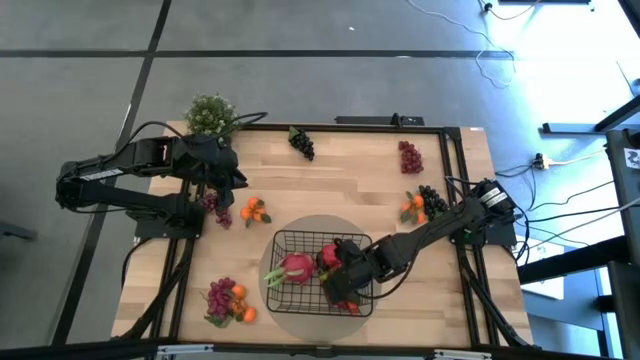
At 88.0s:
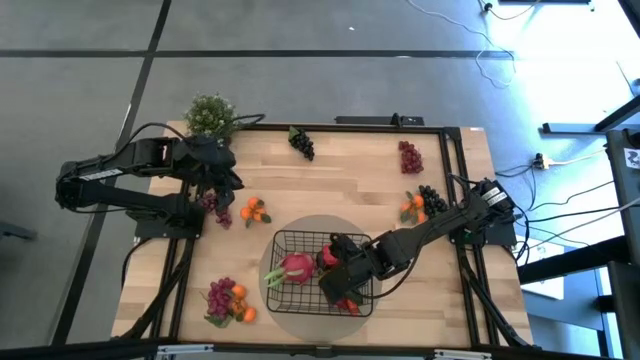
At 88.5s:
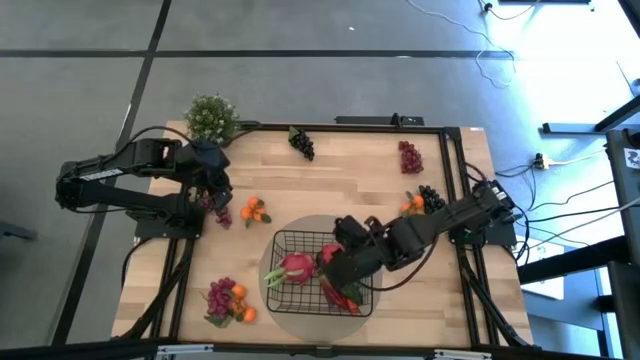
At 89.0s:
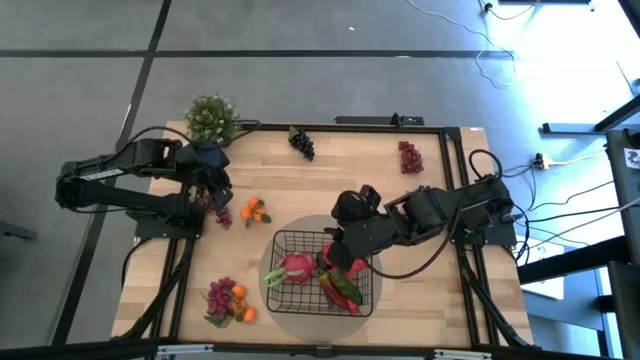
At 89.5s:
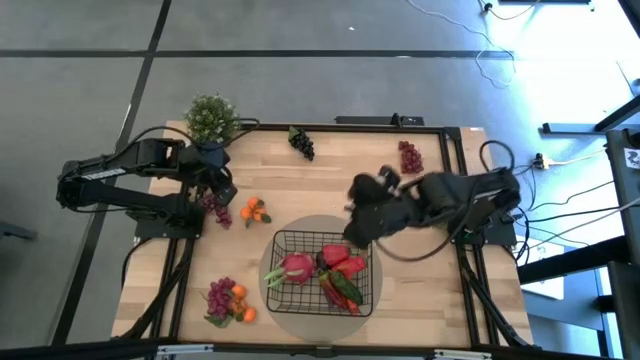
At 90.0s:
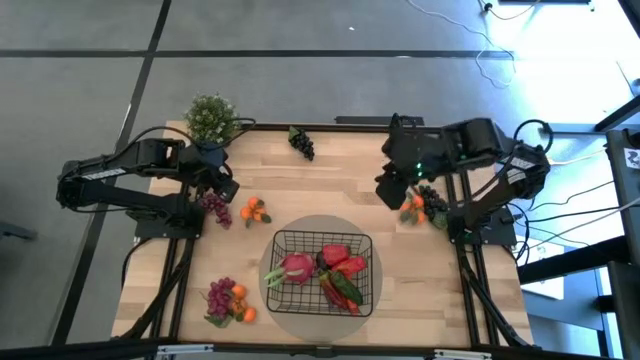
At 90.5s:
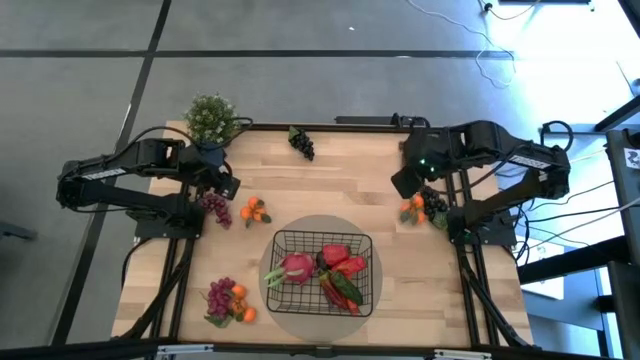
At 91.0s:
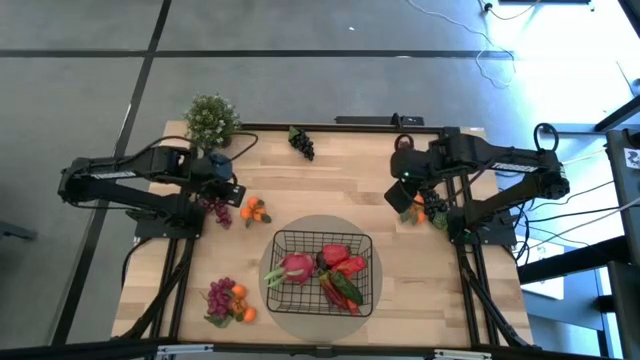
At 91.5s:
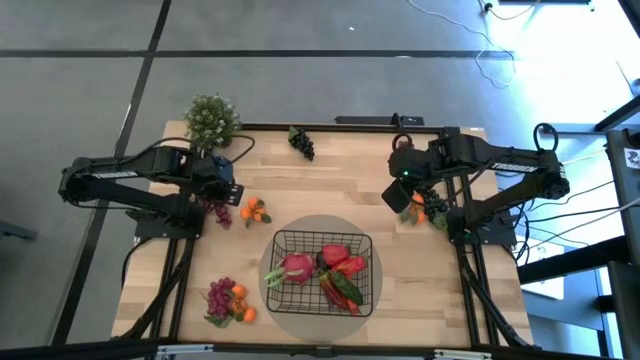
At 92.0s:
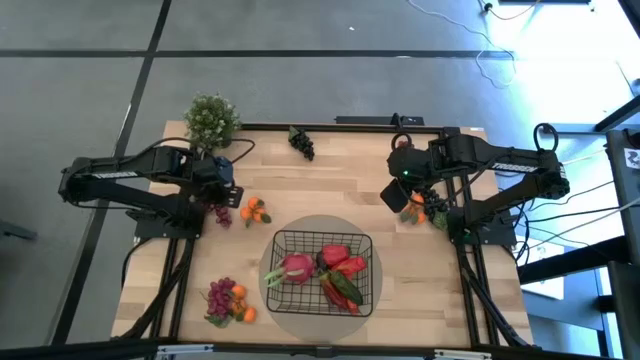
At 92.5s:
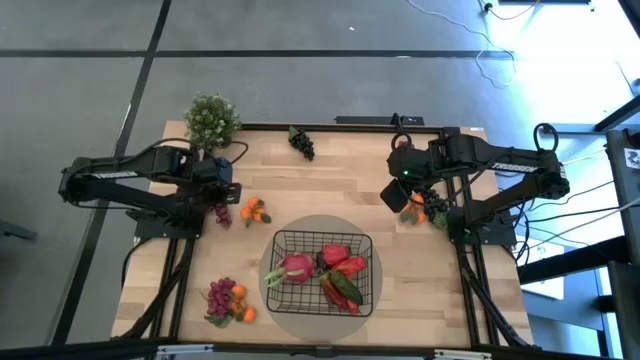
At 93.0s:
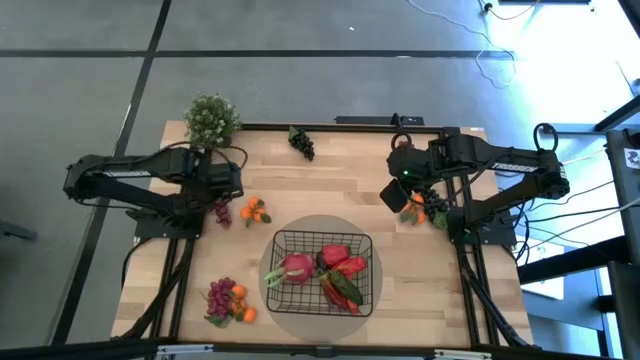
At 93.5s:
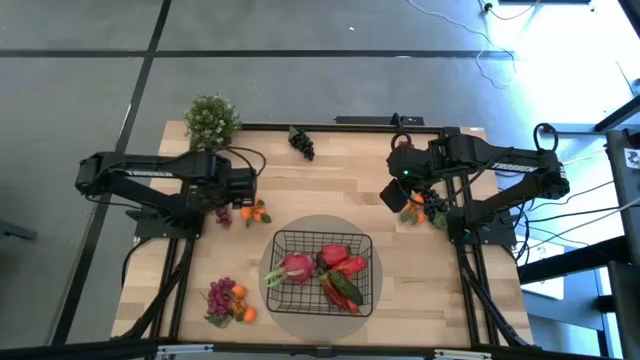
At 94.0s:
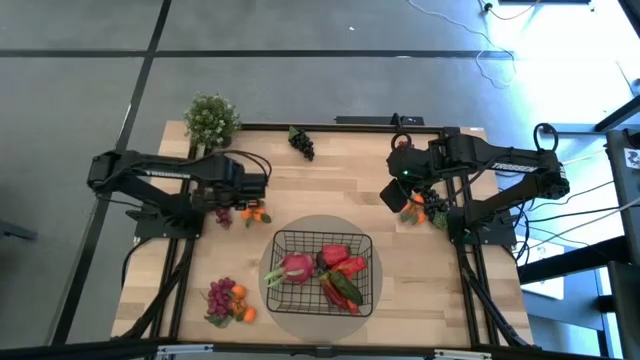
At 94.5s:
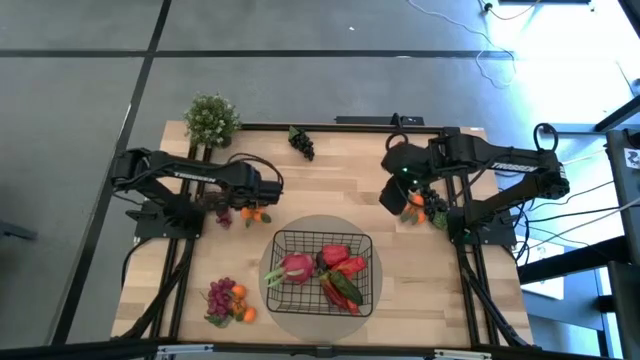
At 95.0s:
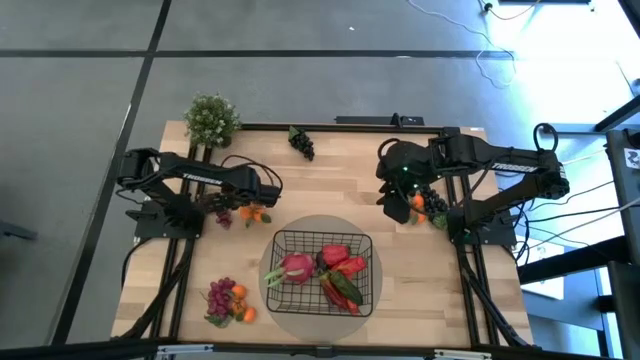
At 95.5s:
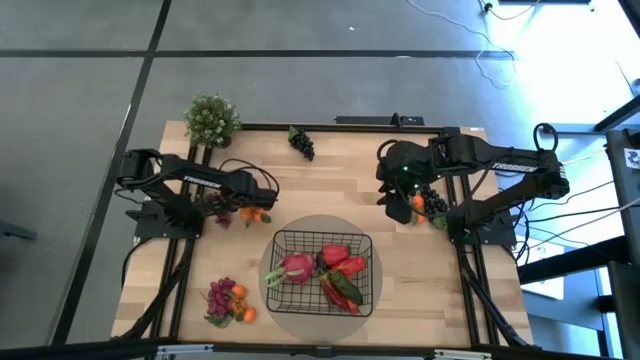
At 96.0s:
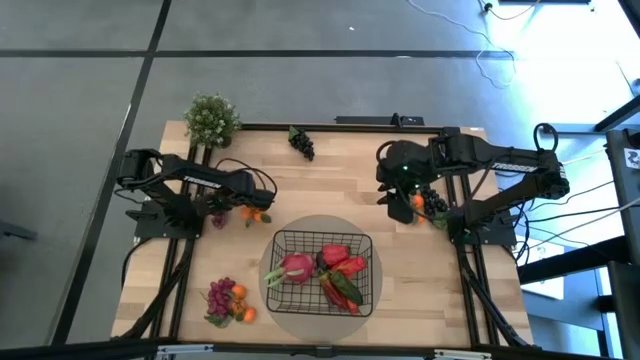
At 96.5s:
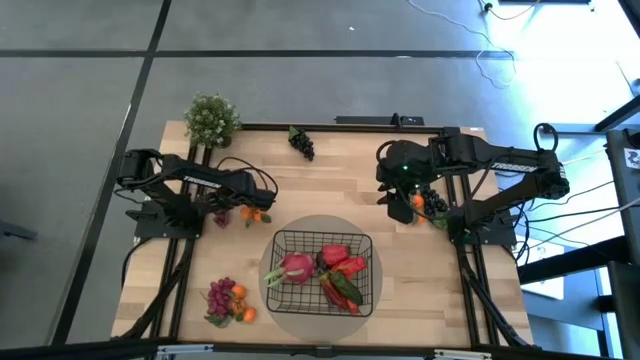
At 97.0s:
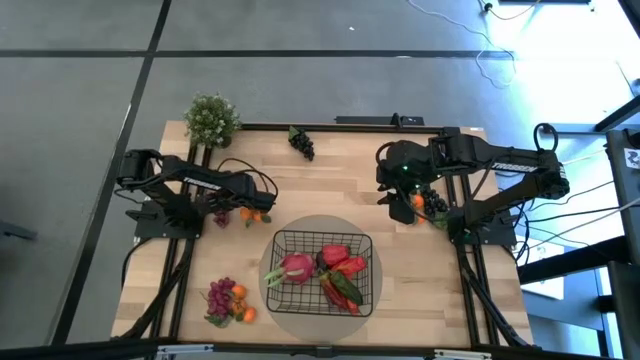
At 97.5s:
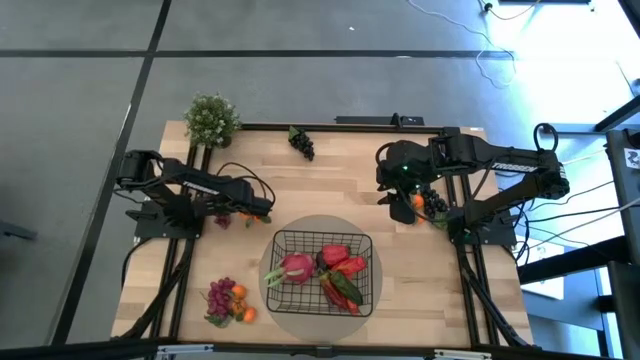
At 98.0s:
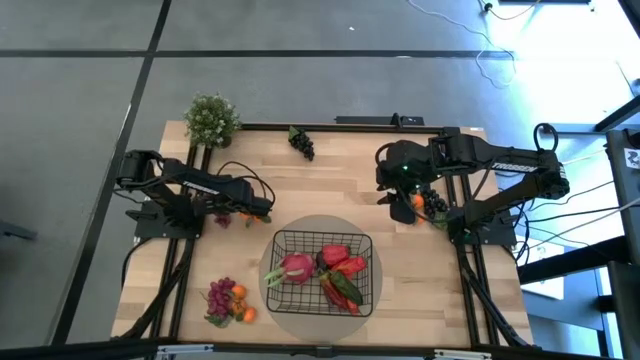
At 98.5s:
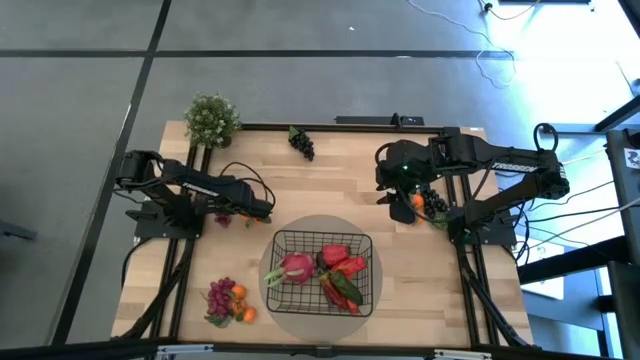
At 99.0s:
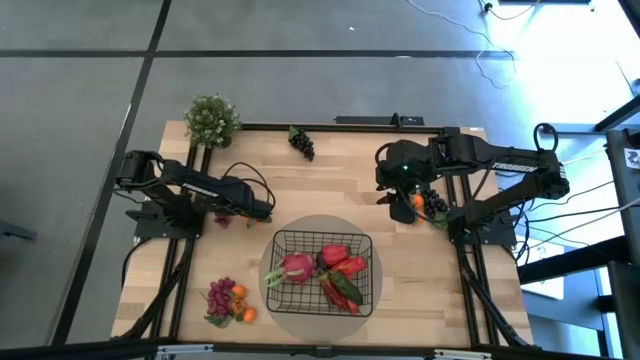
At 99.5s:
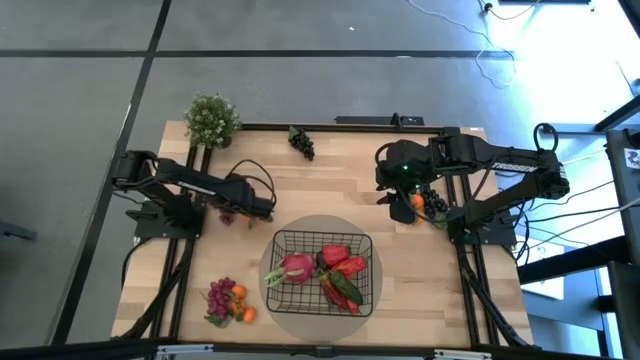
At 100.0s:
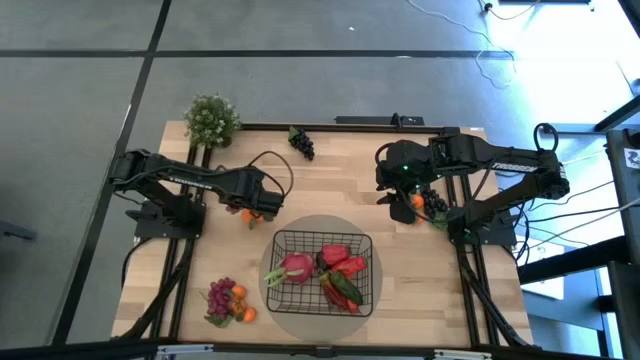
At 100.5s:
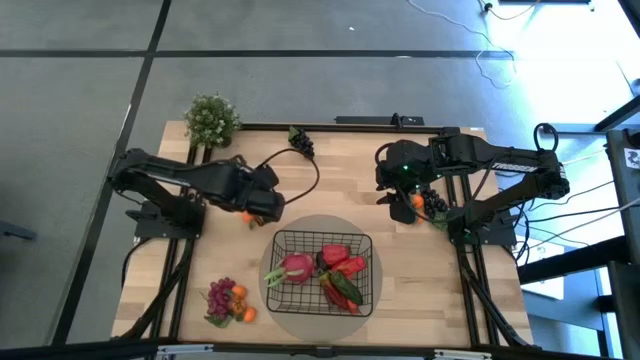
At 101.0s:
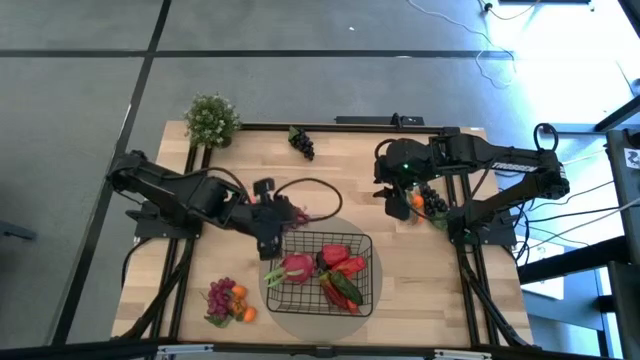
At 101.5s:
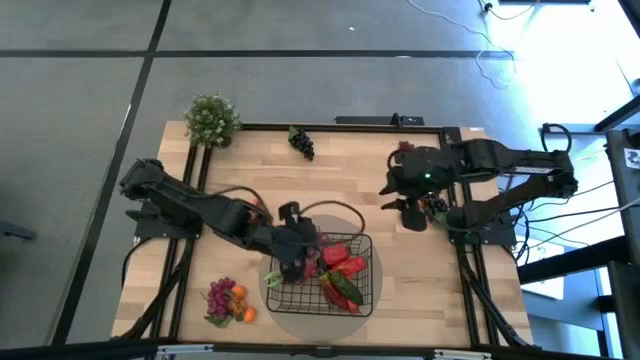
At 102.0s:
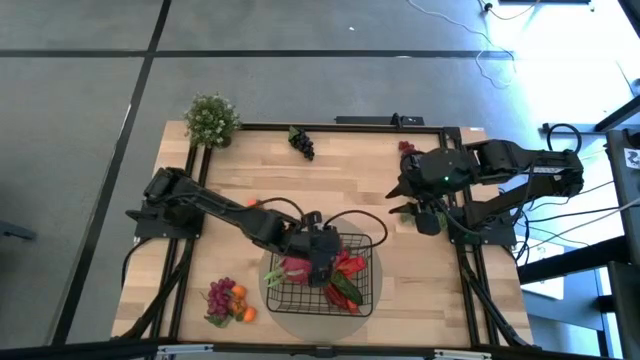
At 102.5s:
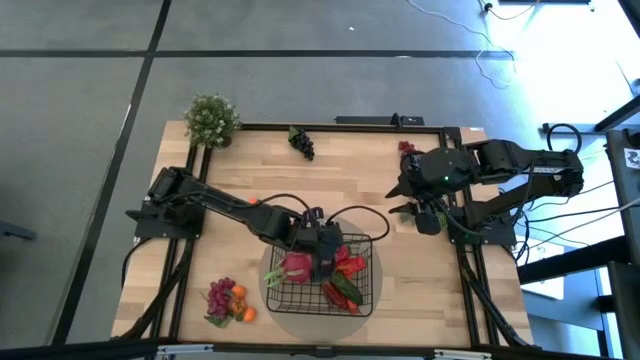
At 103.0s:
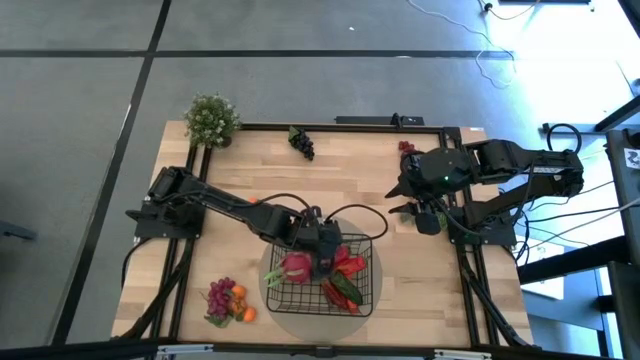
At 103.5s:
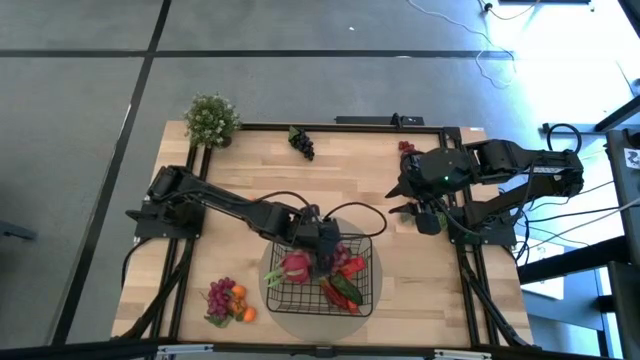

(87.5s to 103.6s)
Task: Build produce basket
Put the top left red grapes into the black wire basket

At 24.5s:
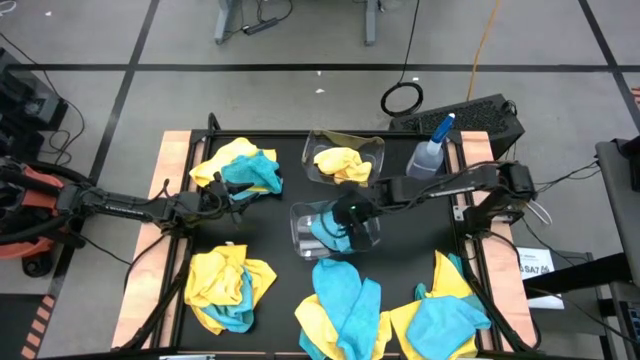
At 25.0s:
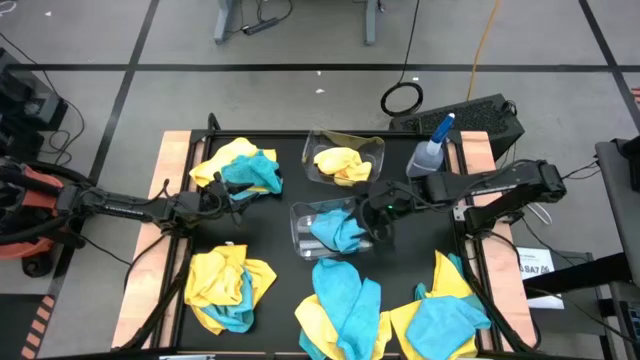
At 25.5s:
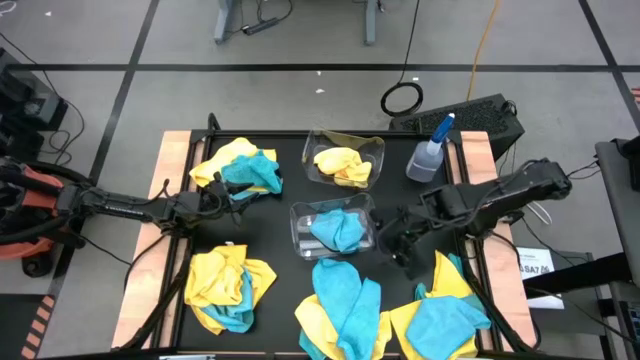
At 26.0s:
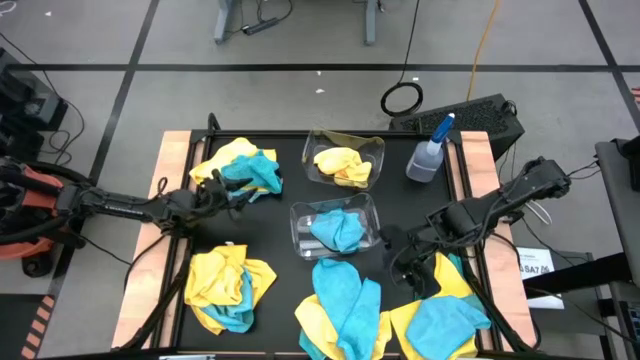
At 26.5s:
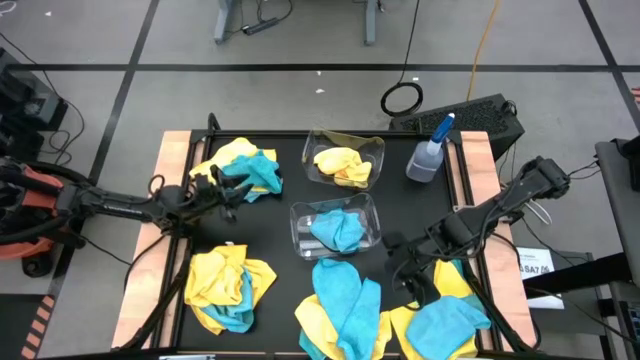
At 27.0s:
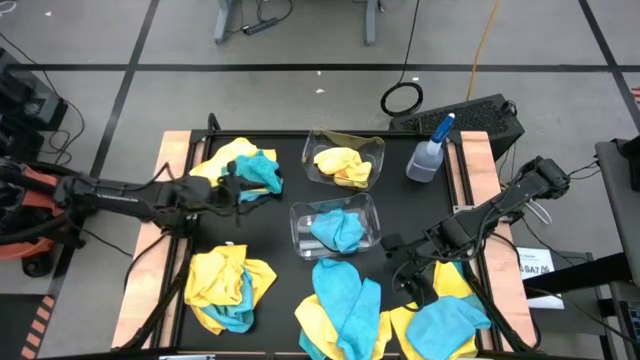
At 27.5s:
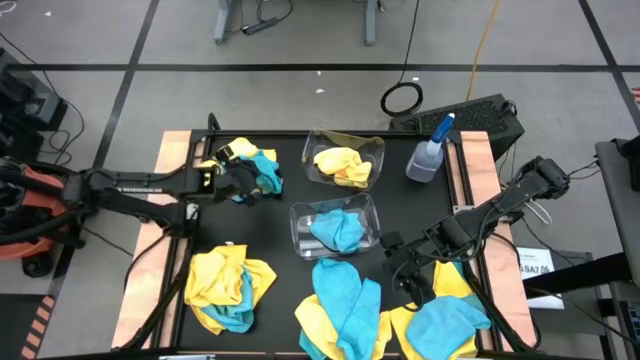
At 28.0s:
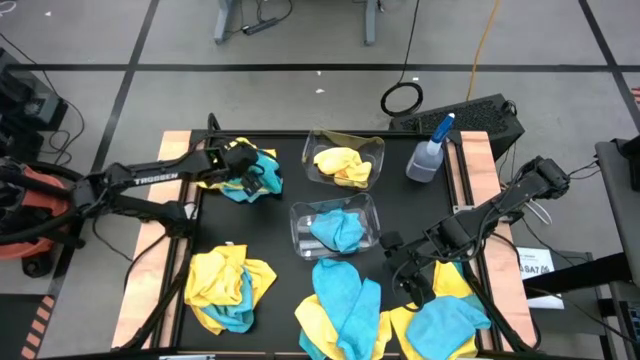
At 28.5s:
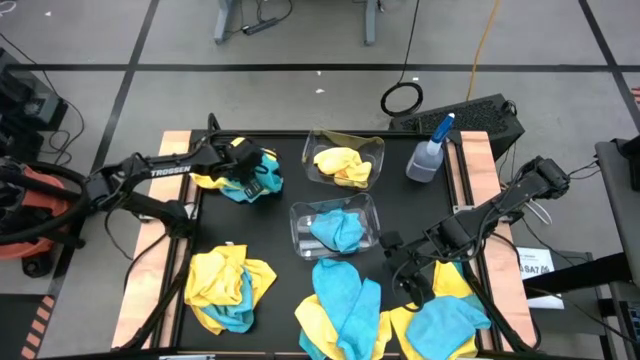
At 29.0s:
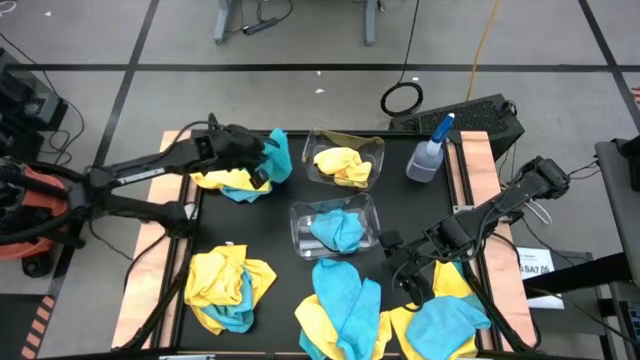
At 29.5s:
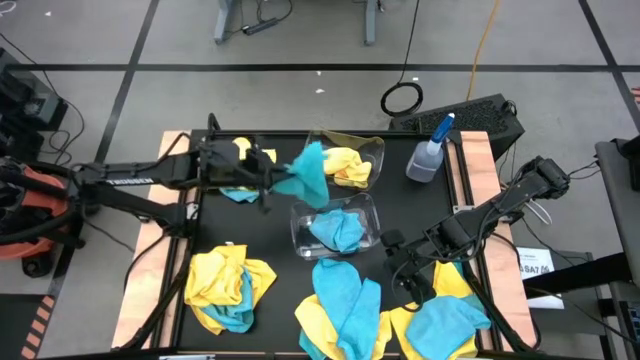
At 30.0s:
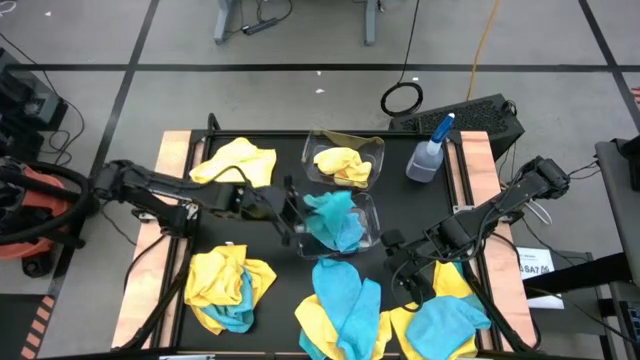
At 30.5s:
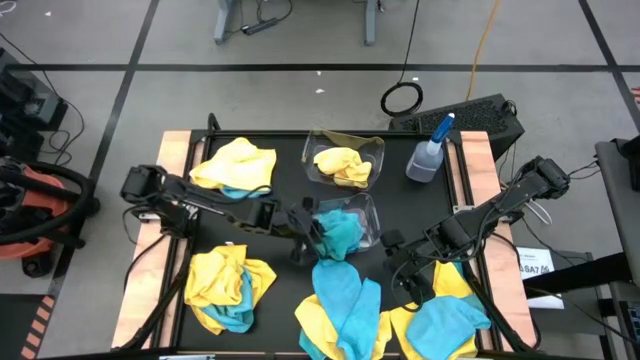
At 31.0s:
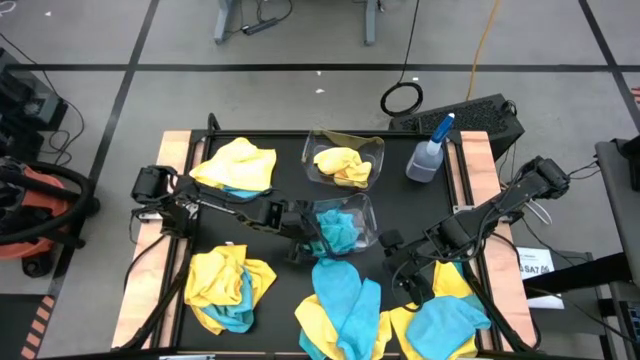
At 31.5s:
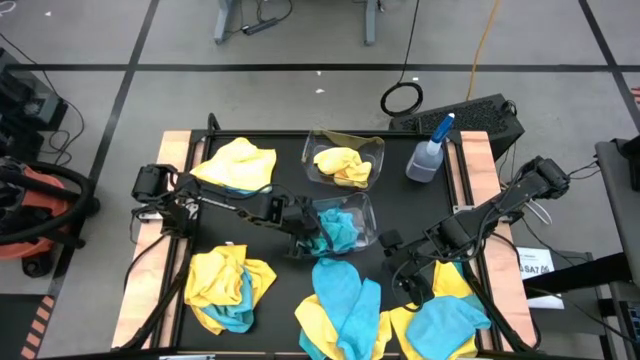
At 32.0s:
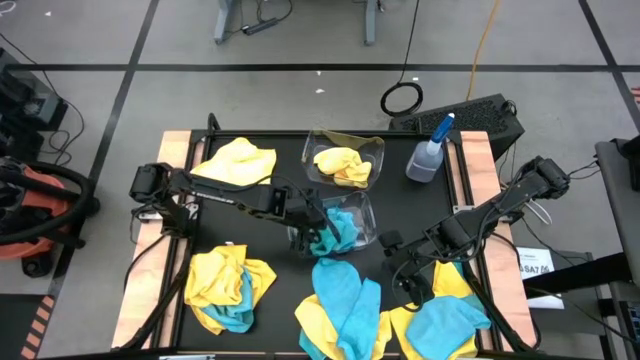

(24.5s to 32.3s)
Task: Sort microfiber towel by color & place in baskets
Put the blue microfiber cloth into the bottom transparent bin
